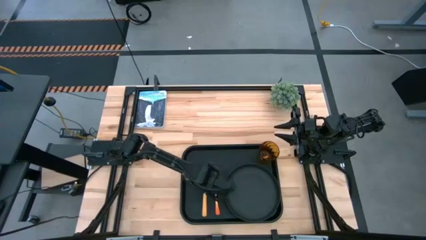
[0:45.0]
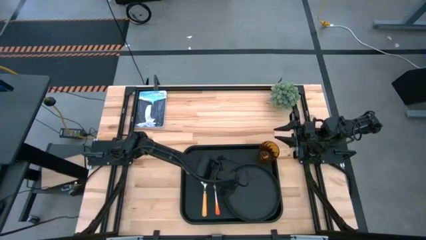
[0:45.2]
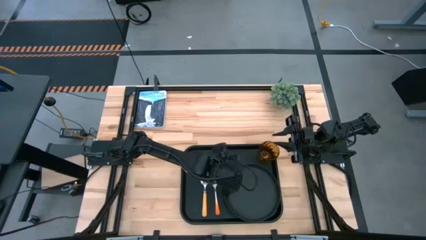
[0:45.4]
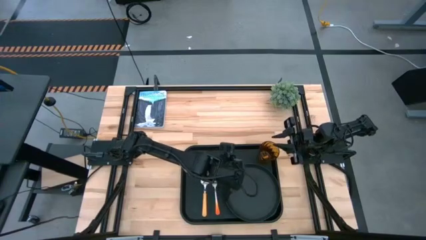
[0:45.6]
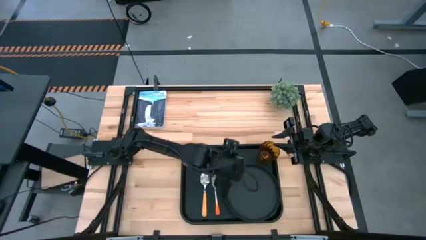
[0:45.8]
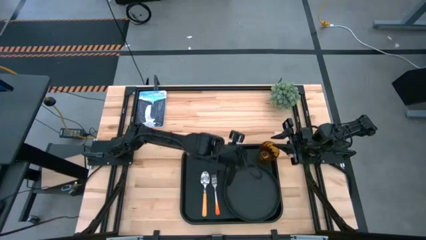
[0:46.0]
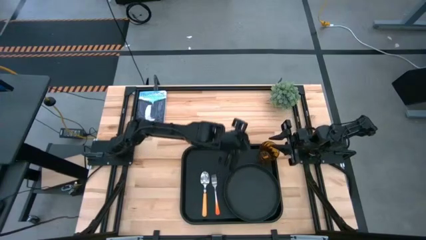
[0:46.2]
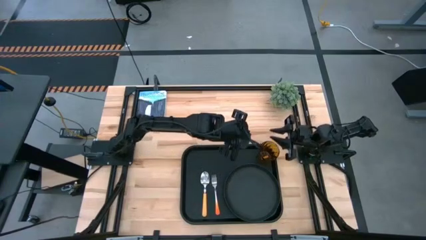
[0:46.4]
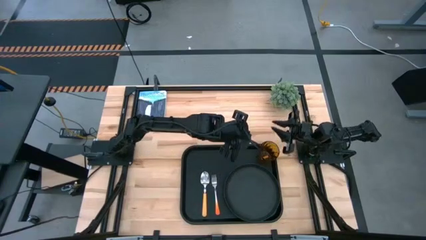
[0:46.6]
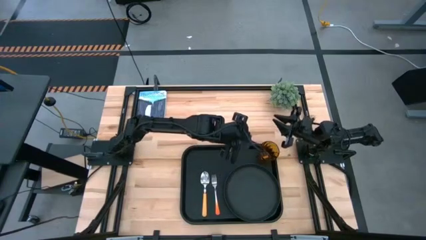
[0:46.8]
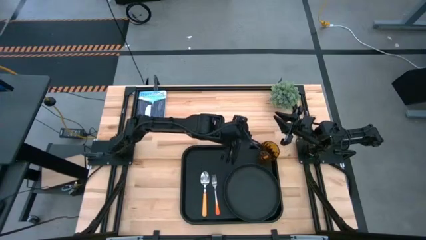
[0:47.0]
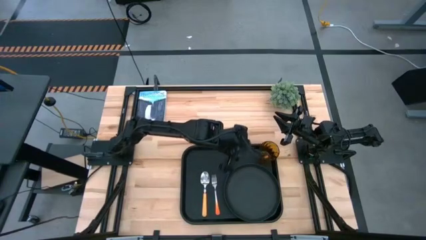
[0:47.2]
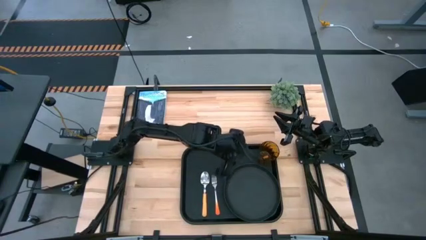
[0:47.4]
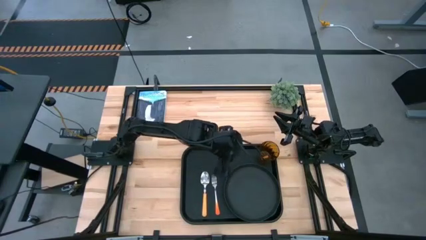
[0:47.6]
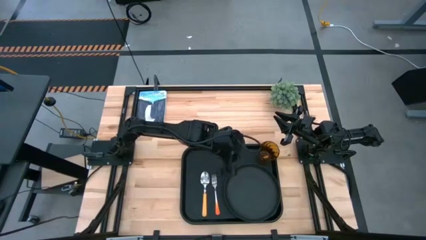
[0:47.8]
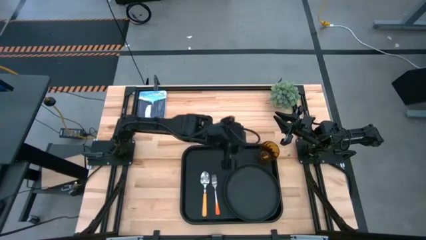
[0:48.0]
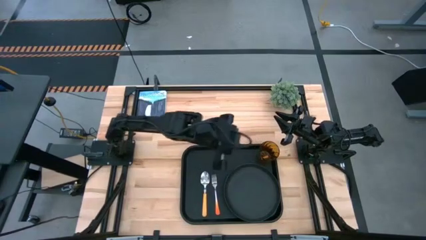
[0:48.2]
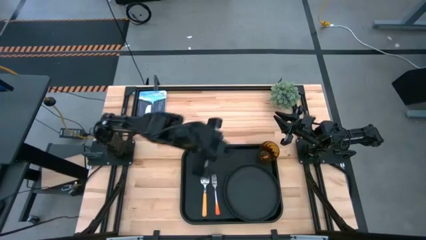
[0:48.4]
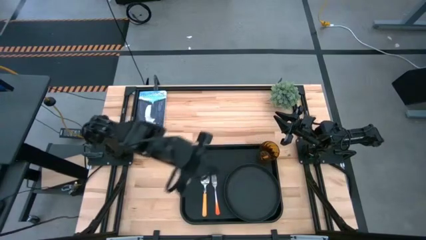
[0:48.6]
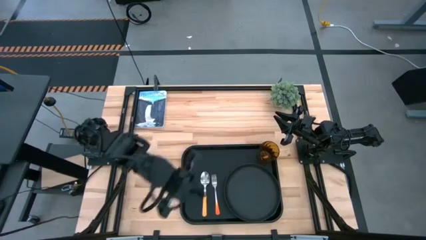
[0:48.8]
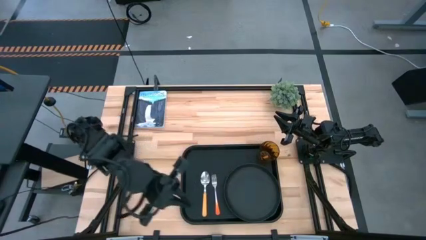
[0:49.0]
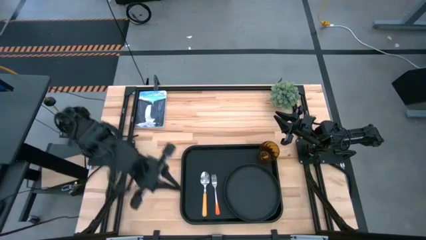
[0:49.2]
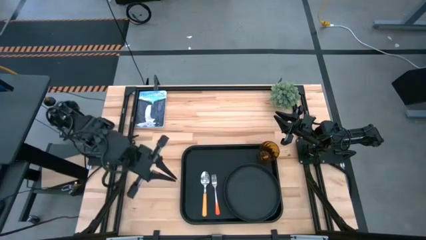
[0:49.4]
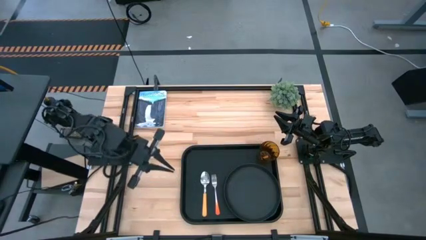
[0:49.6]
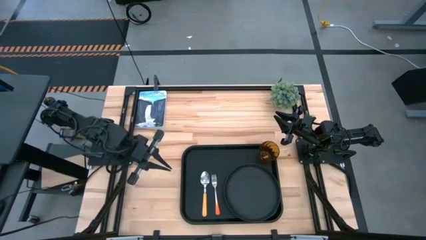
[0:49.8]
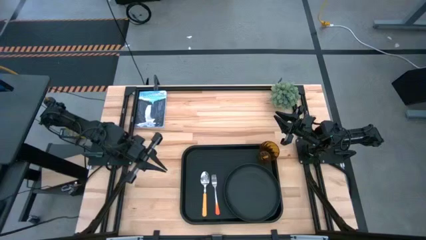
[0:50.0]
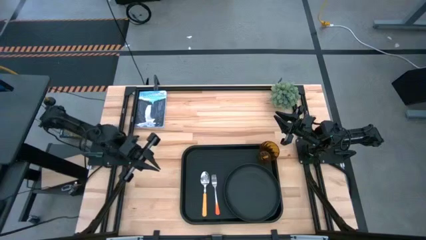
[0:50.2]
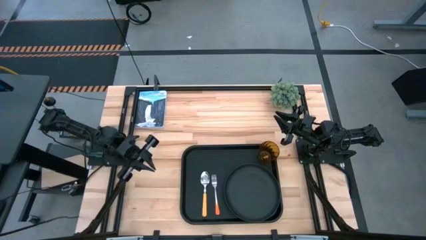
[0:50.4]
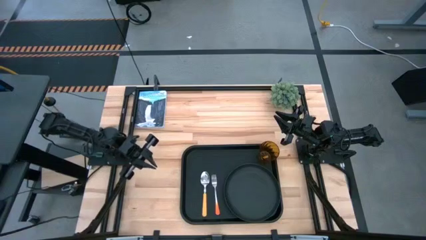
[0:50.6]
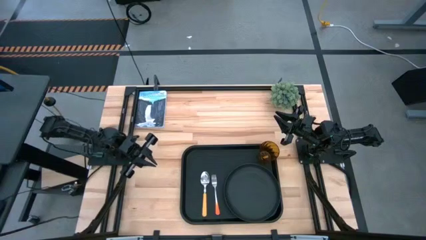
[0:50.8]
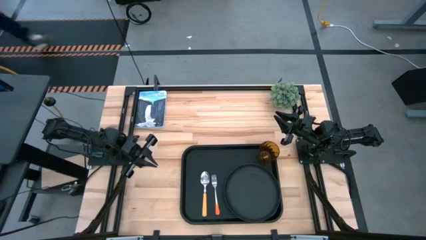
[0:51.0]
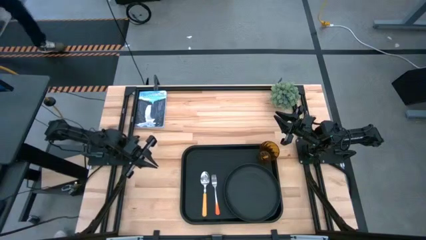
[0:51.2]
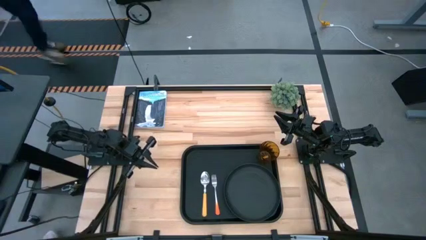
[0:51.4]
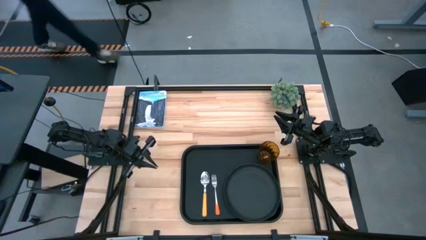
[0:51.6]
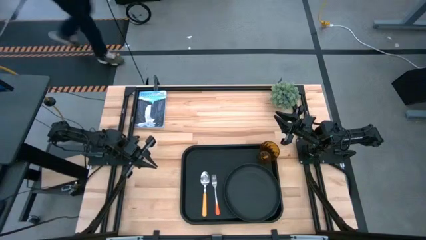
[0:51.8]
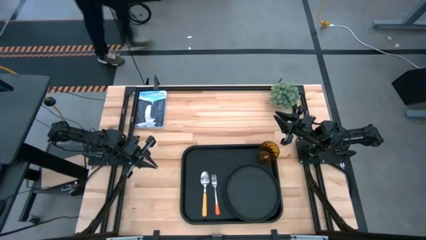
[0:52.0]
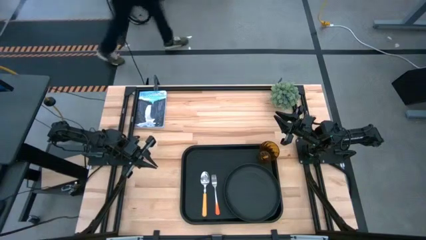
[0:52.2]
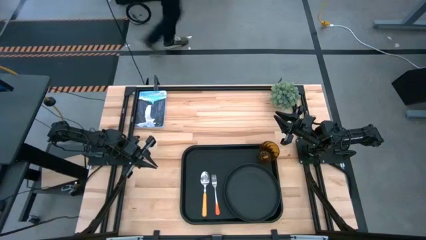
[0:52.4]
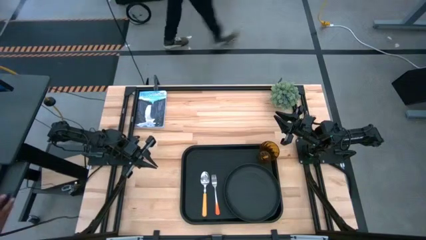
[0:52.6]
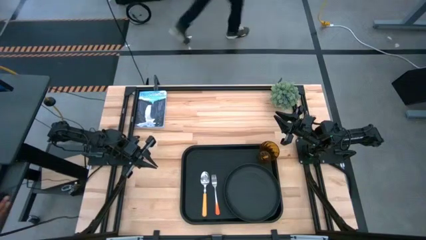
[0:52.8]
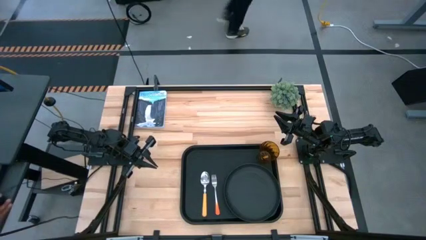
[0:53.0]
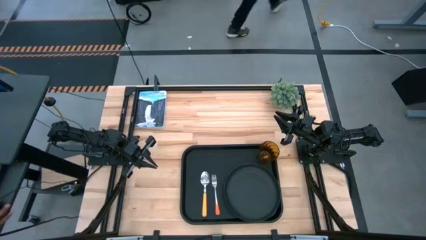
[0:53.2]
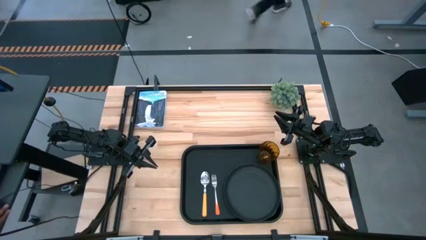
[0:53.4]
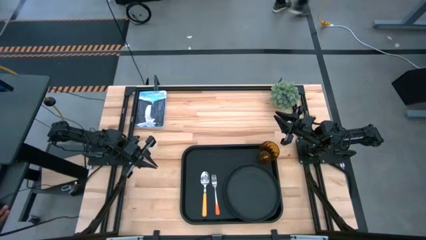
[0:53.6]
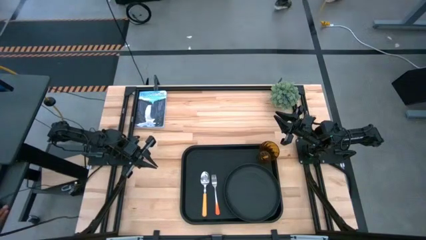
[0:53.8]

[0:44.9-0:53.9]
Task: Pick and place plate/cup/fork/spoon on tray
Return to Home Position

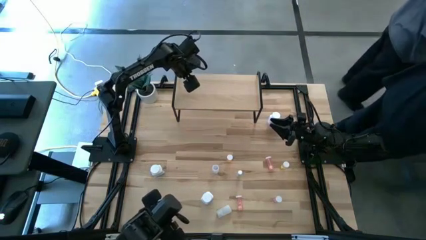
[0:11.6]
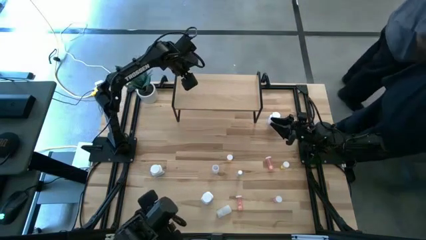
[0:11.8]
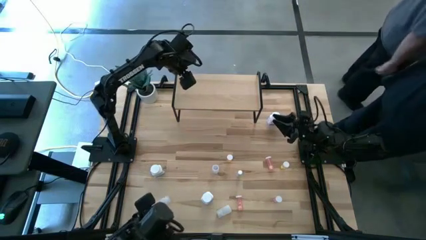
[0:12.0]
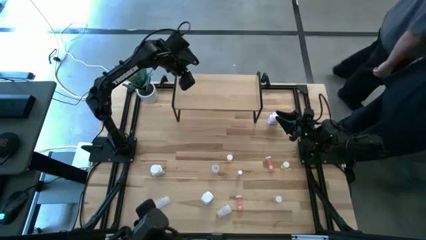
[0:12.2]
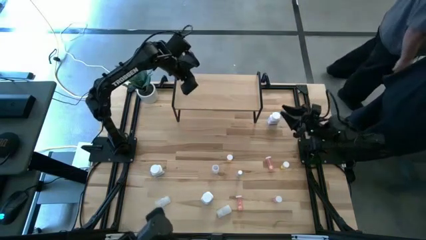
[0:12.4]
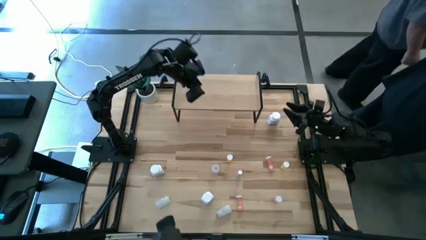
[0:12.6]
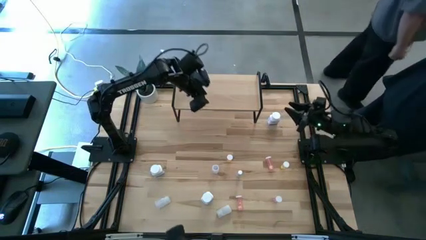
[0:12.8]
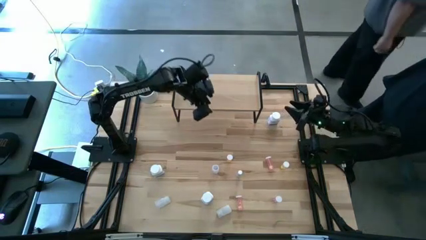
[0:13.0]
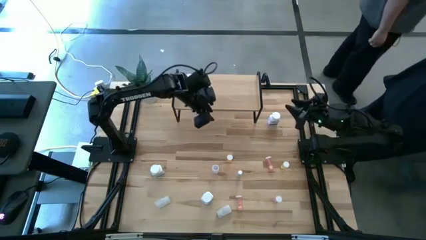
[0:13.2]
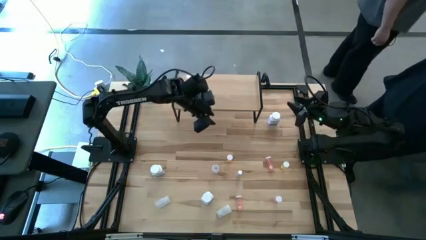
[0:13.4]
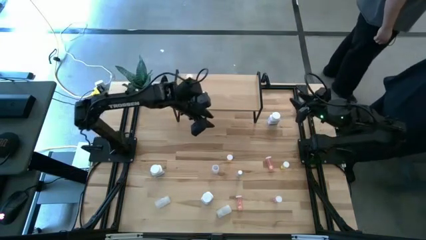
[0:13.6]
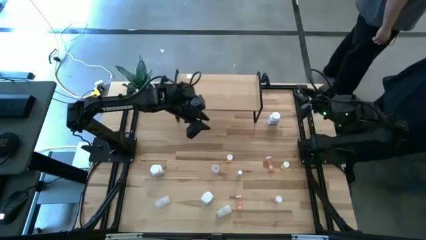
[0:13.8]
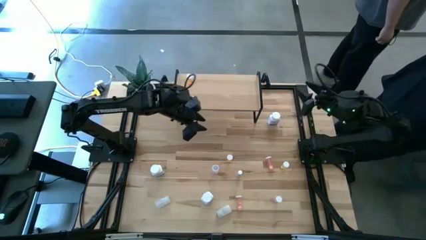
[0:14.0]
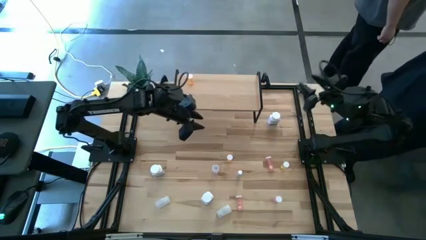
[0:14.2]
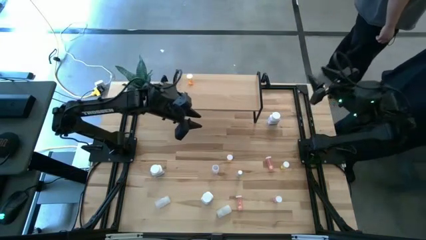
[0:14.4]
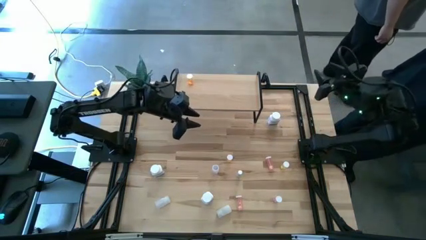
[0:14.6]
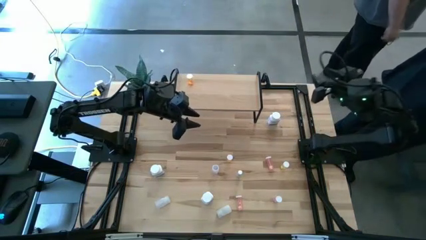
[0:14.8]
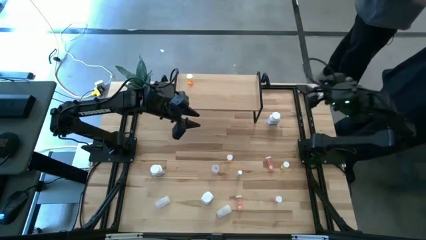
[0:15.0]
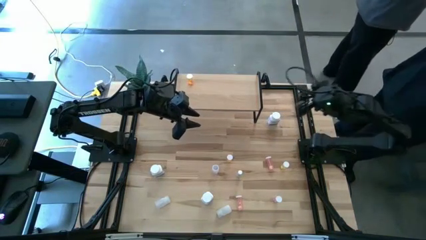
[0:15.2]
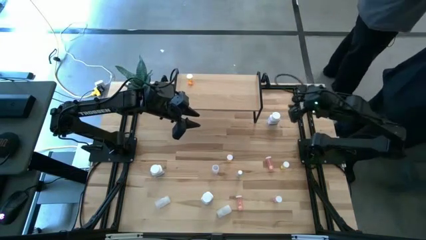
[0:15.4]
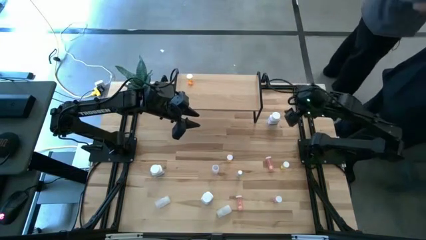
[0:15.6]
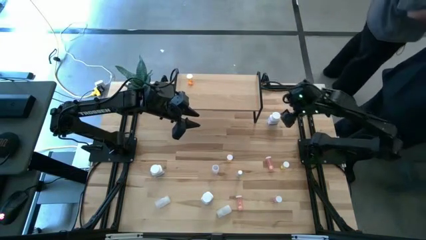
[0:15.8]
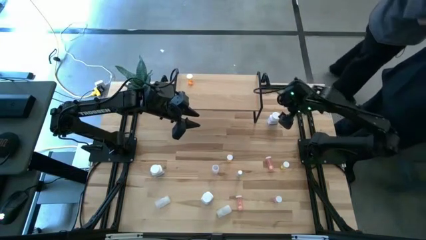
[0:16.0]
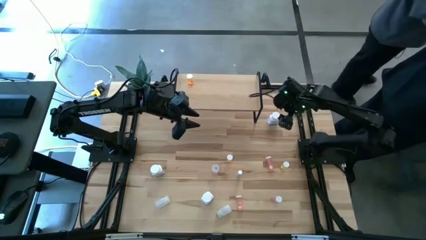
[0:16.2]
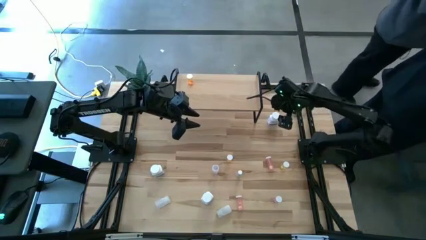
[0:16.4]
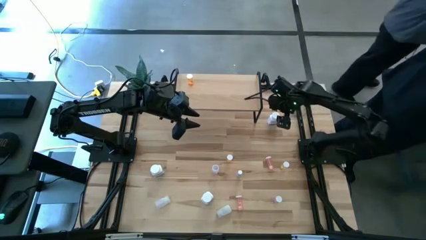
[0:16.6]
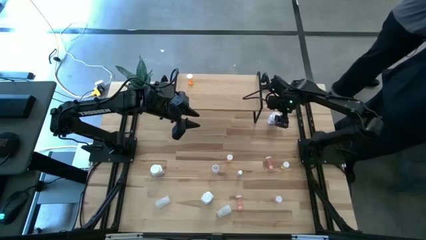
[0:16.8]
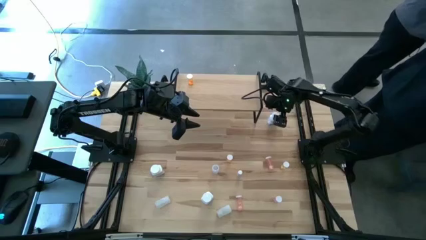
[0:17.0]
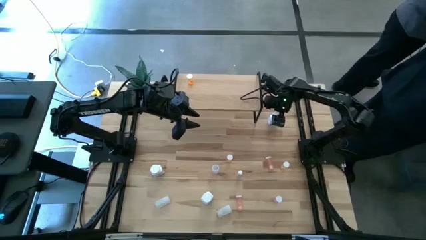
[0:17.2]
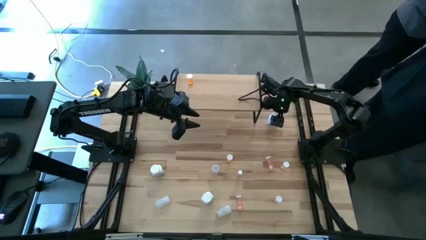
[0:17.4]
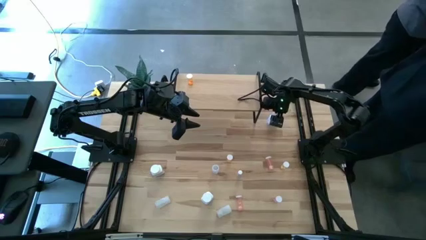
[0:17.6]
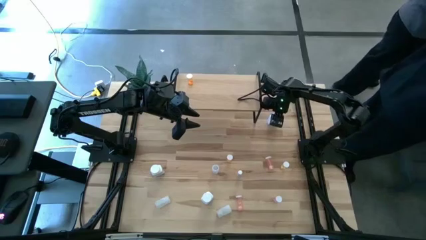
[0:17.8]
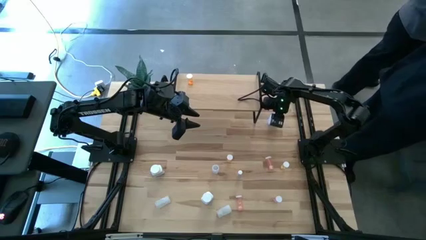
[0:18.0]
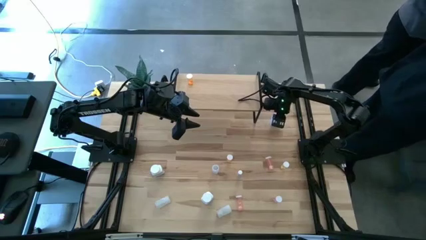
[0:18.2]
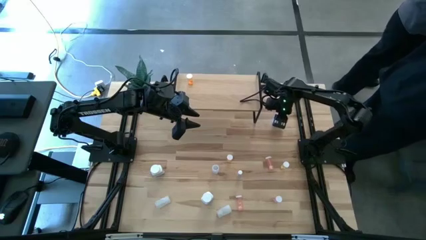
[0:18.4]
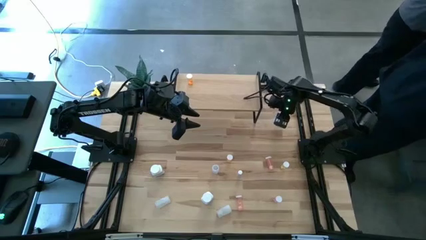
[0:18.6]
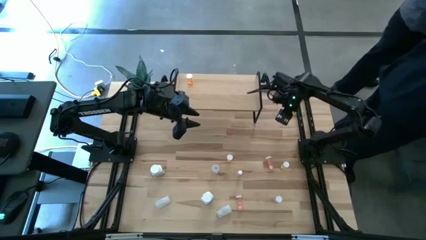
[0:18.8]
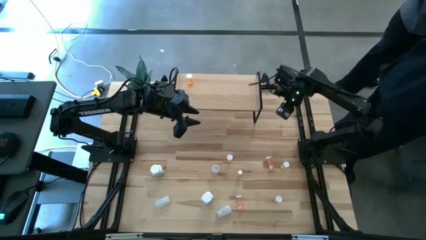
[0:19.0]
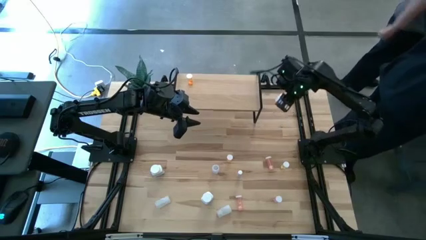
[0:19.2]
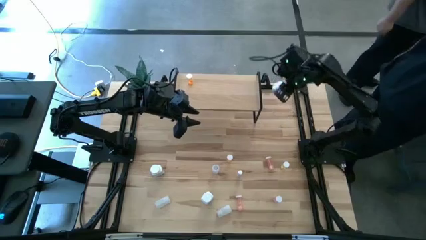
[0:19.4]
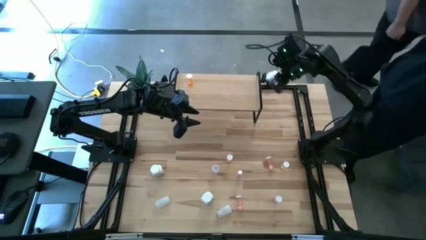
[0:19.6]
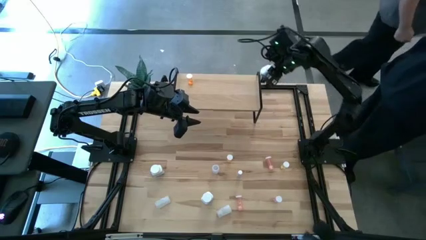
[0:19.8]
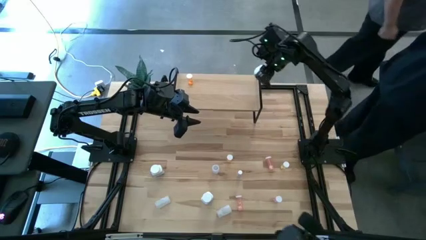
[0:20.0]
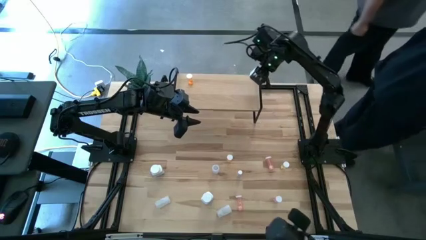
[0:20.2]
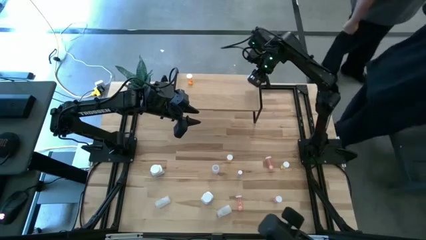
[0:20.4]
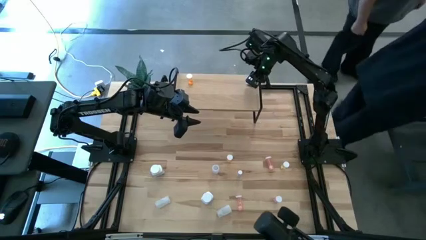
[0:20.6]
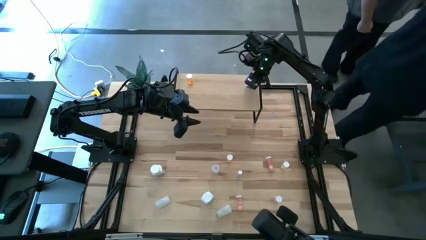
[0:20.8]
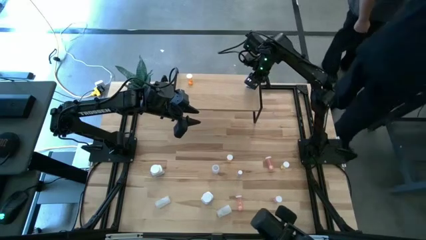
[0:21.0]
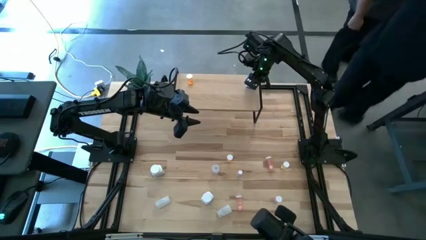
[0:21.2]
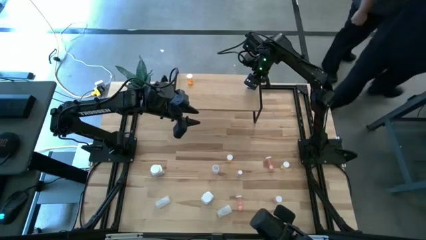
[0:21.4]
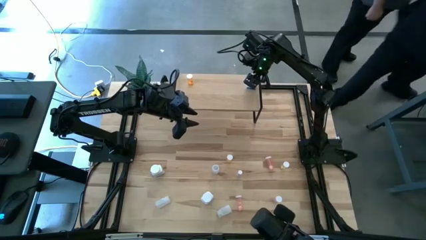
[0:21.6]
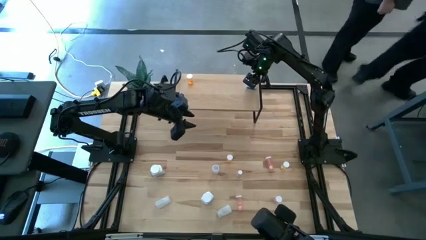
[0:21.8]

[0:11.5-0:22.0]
Task: Pick and place medicine bottles onto shelf by color
Put the top right white supplement bottle on the shelf
